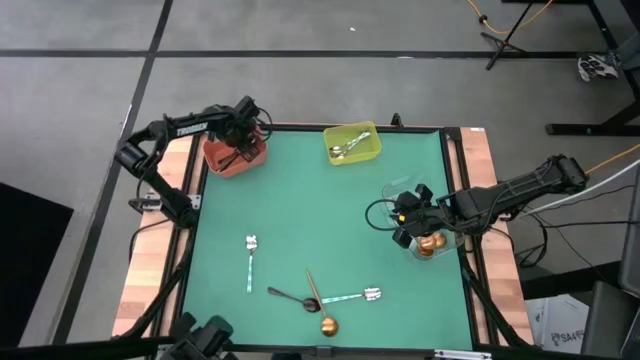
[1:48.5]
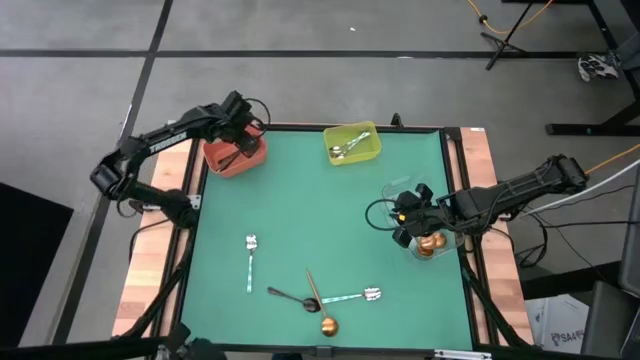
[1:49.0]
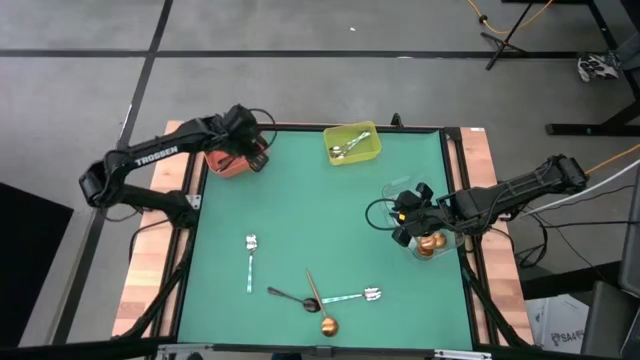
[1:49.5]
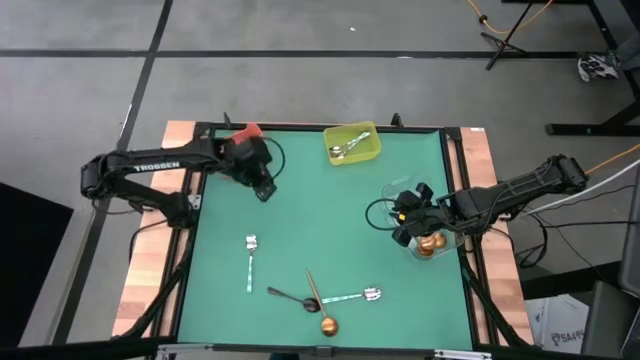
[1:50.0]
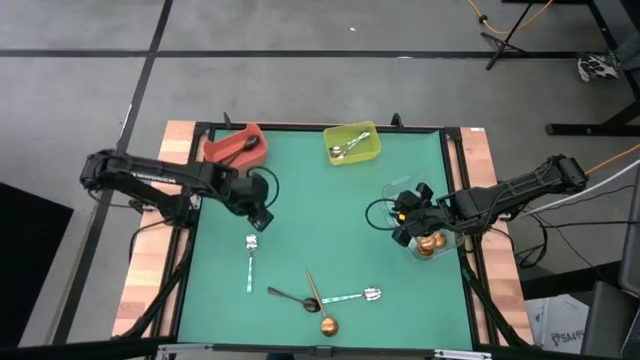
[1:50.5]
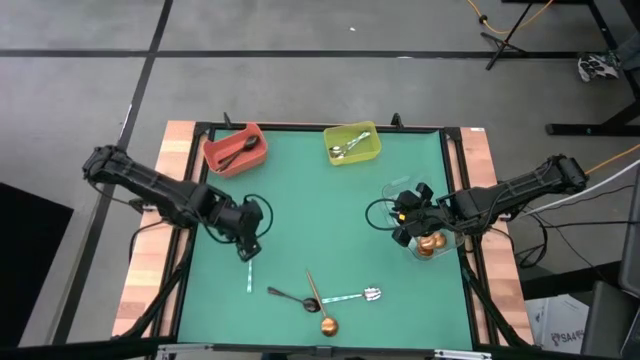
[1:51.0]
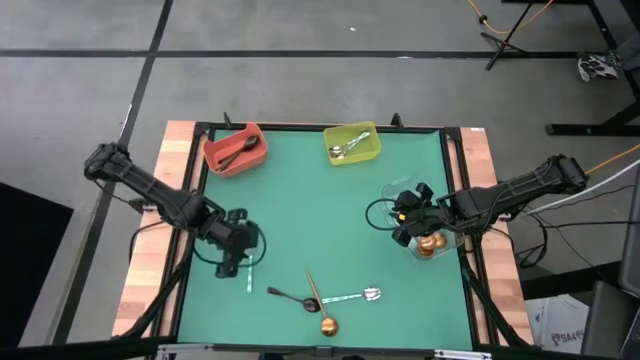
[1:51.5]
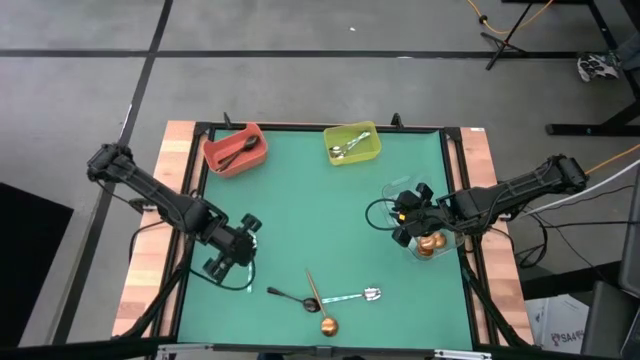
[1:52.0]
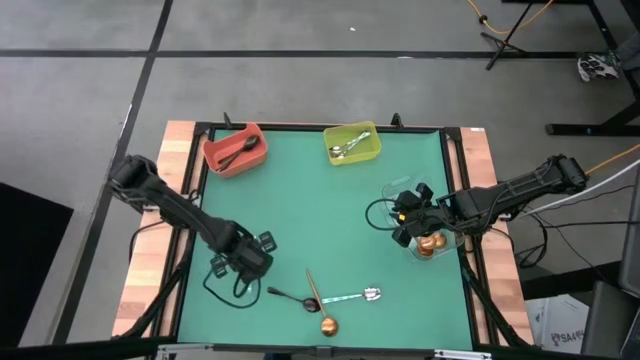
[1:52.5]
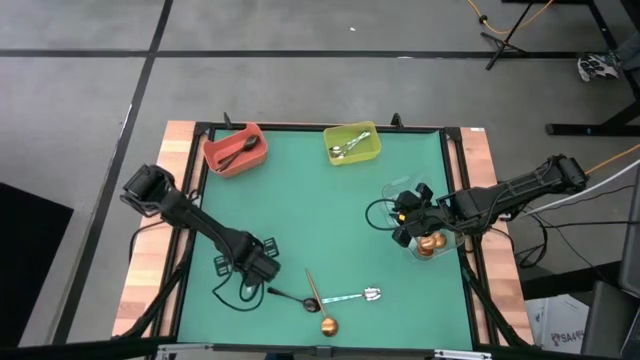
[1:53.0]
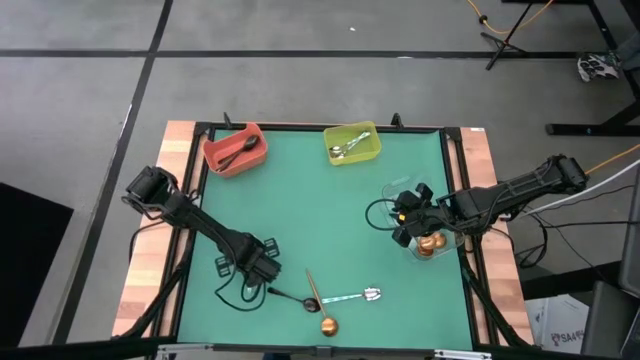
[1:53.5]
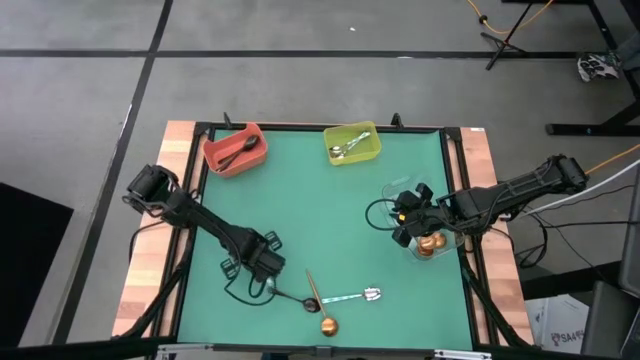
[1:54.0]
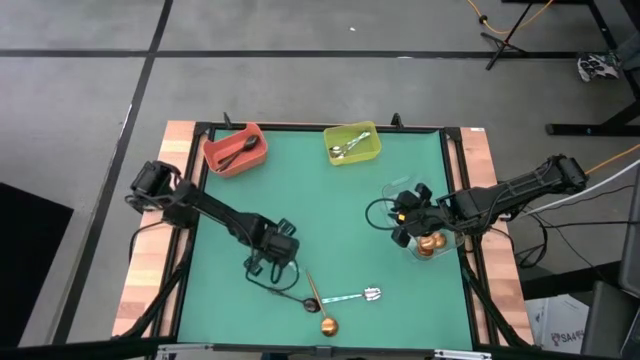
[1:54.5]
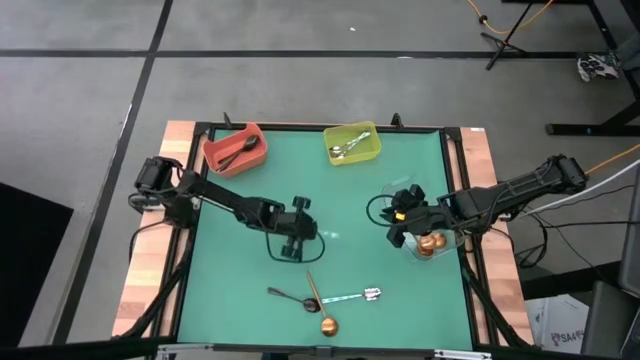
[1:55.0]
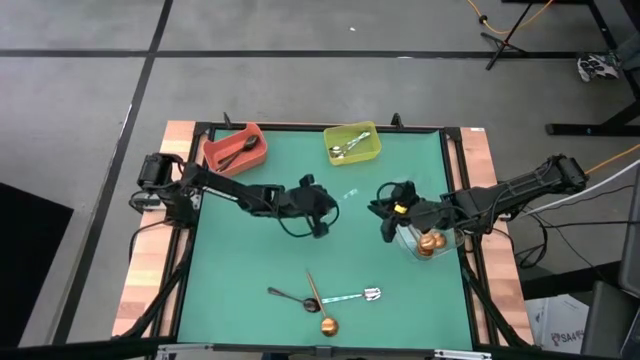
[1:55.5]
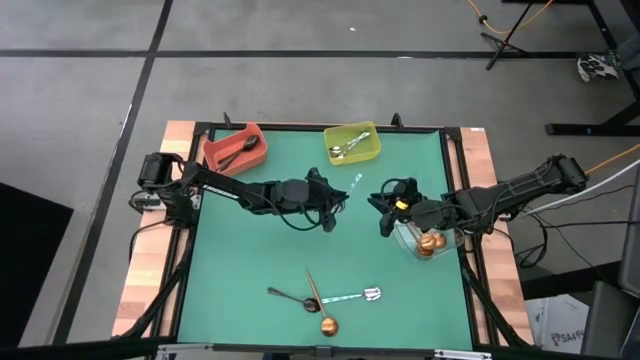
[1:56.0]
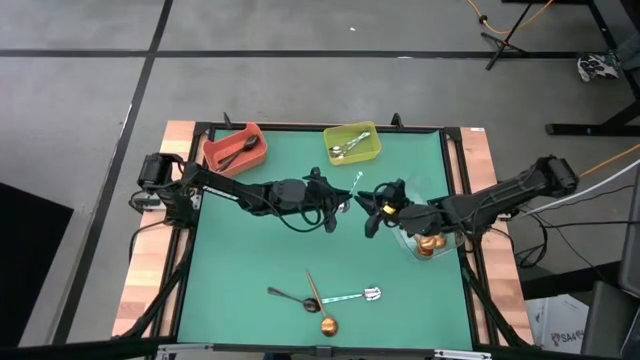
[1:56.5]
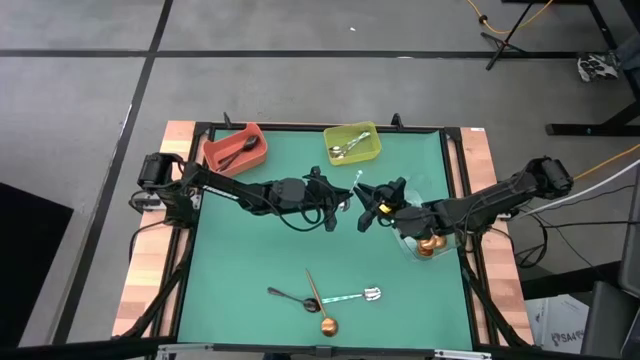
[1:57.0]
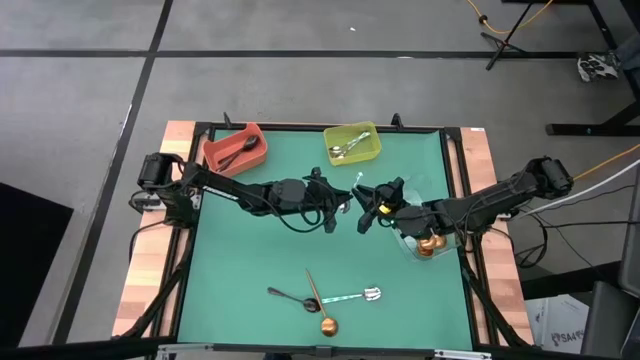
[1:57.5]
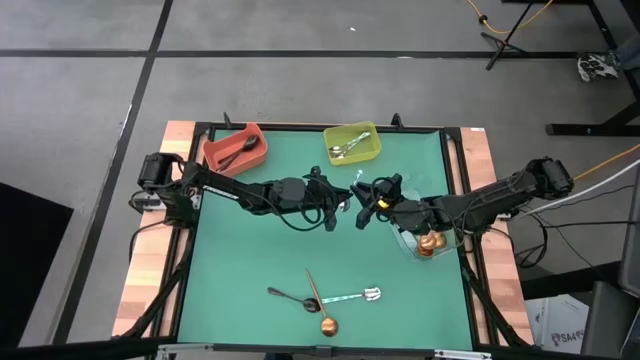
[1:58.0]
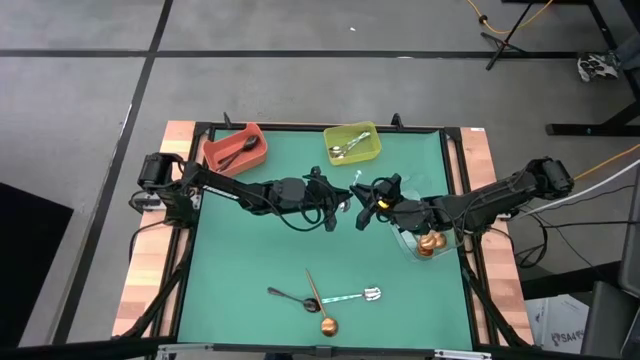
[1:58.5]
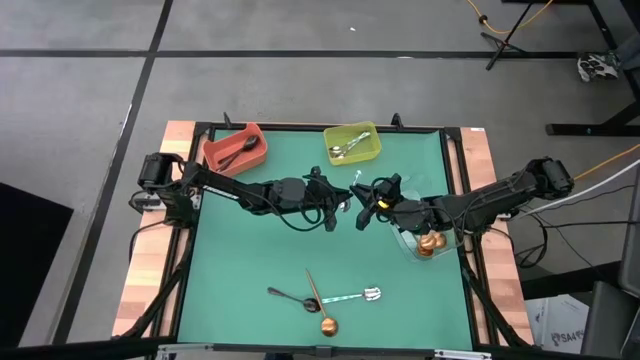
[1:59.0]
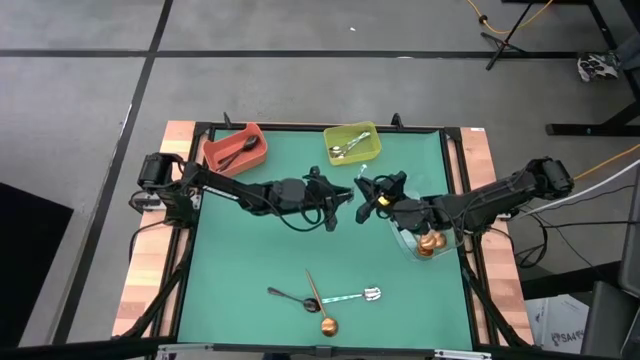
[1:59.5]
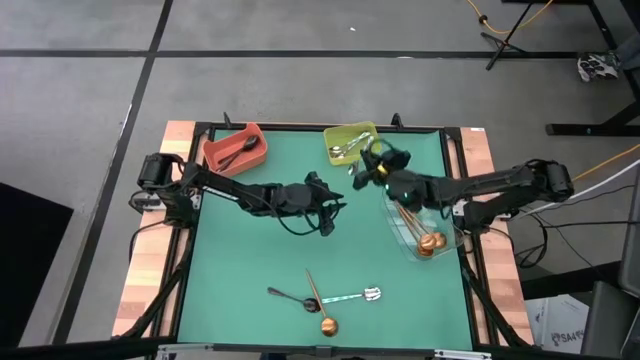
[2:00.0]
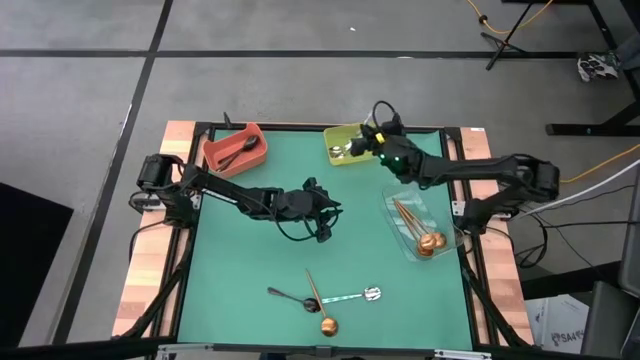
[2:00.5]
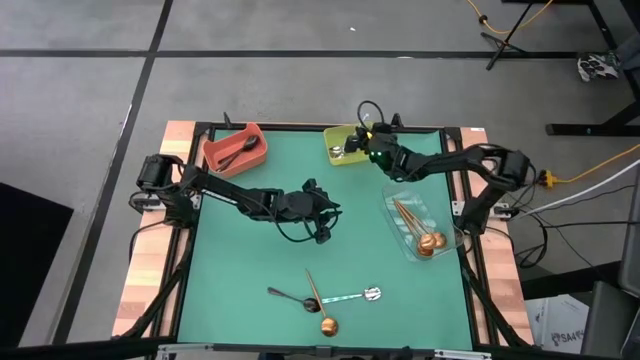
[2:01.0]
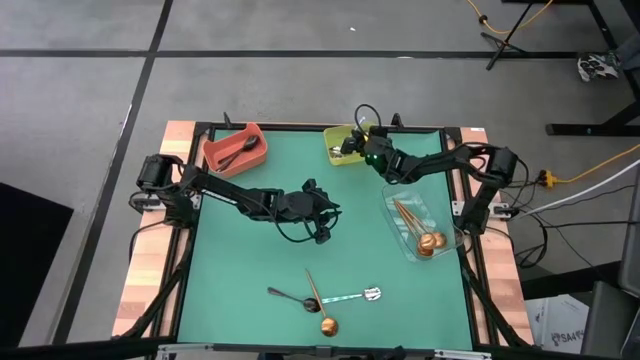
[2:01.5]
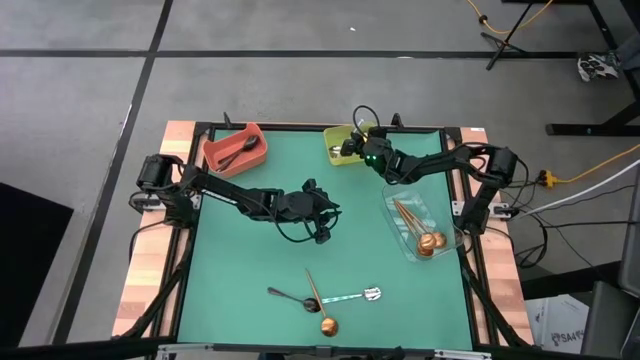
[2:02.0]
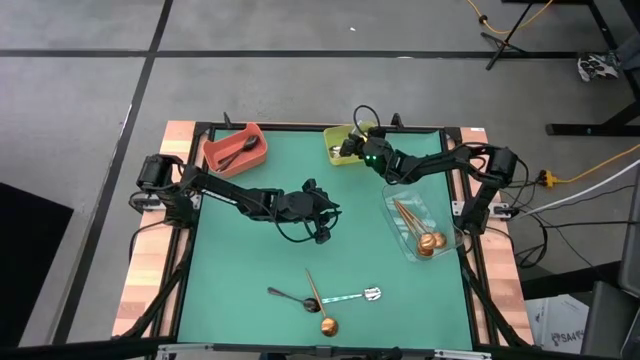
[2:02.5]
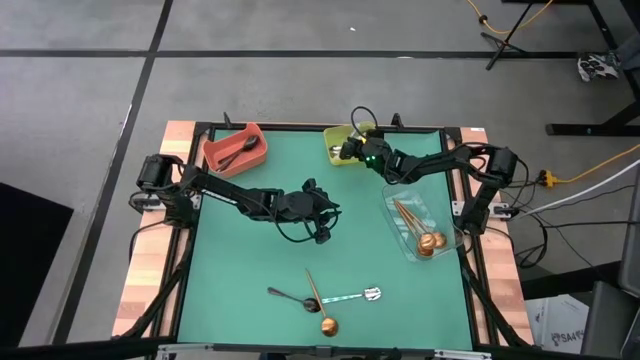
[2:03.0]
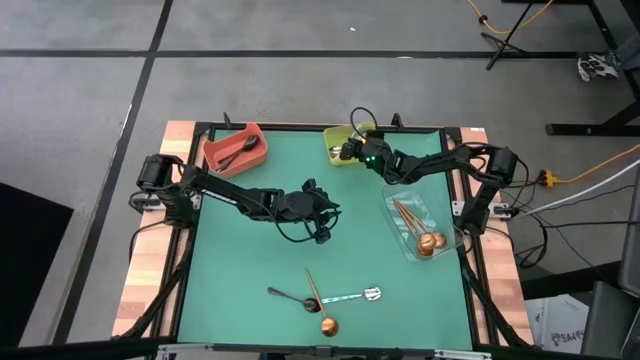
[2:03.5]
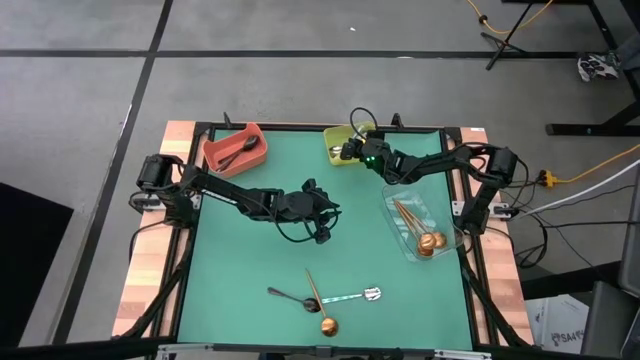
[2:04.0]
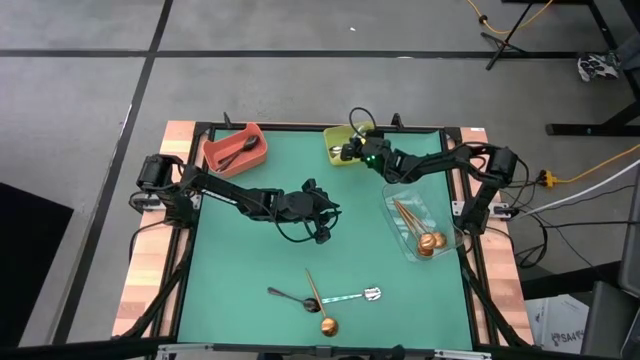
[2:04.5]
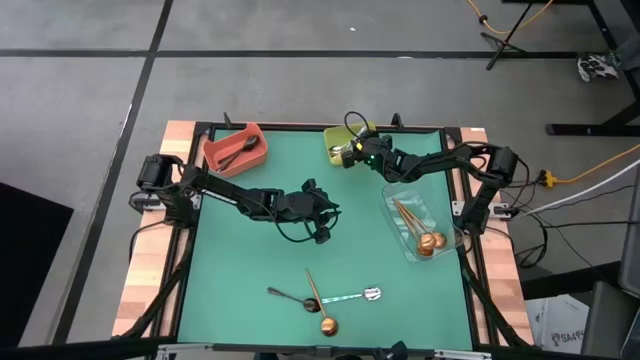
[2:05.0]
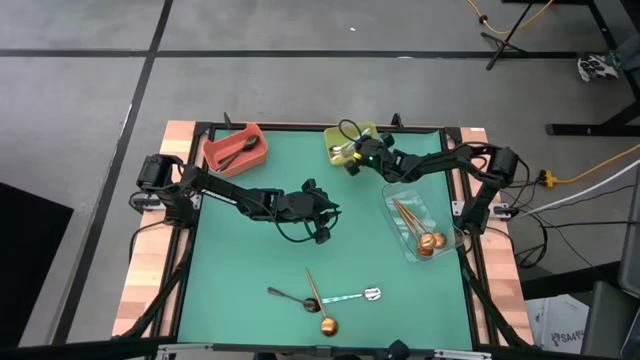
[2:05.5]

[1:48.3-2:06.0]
Task: Sort silverware by color (type)
Put the left white and green spoon into the yellow bin

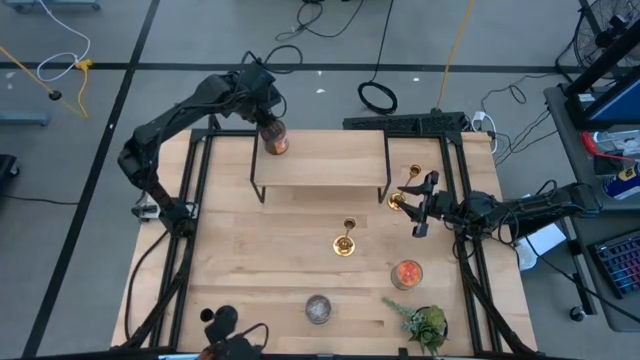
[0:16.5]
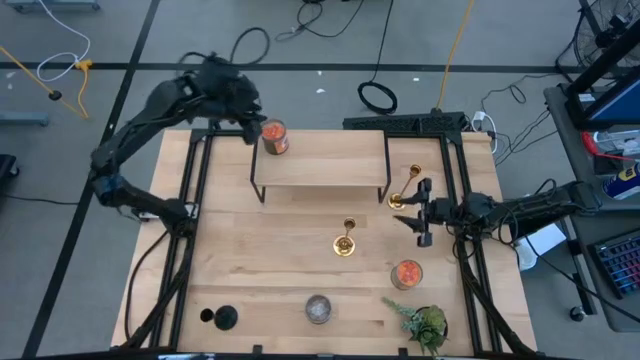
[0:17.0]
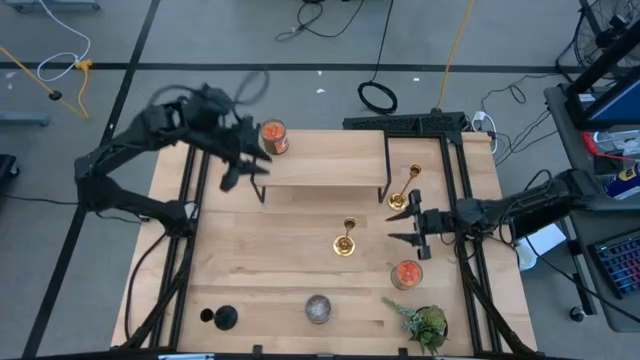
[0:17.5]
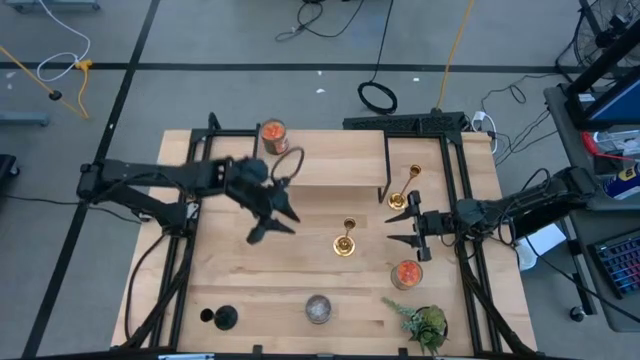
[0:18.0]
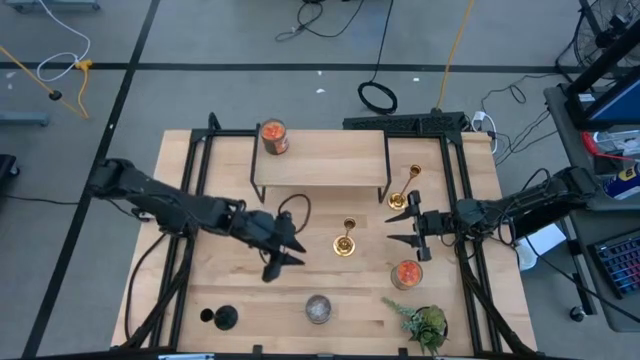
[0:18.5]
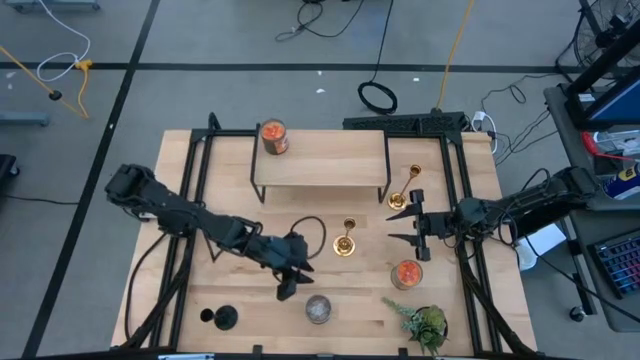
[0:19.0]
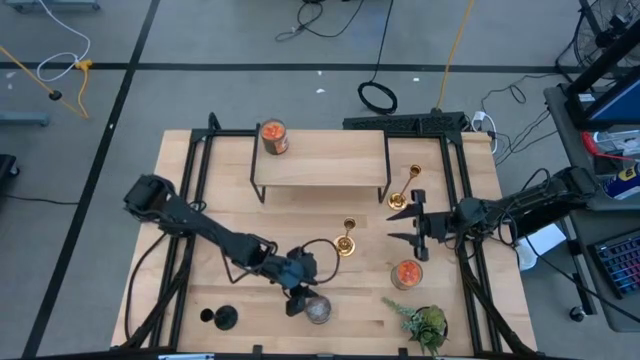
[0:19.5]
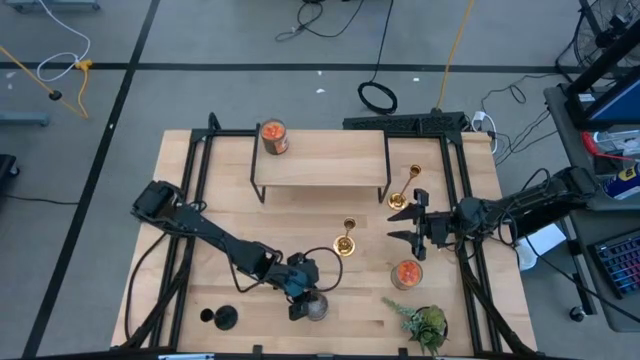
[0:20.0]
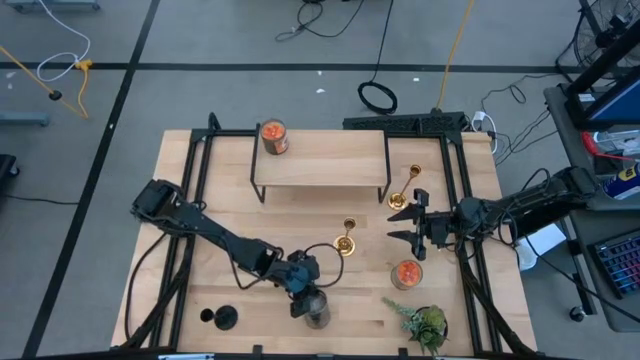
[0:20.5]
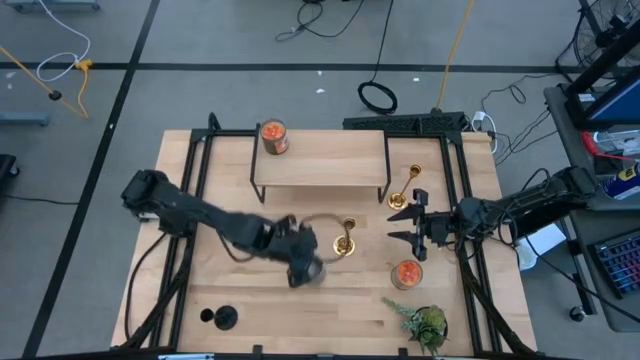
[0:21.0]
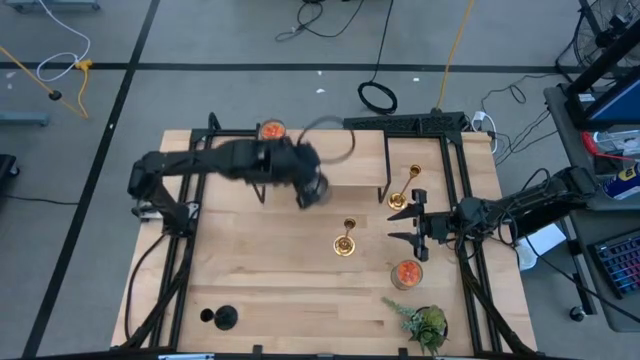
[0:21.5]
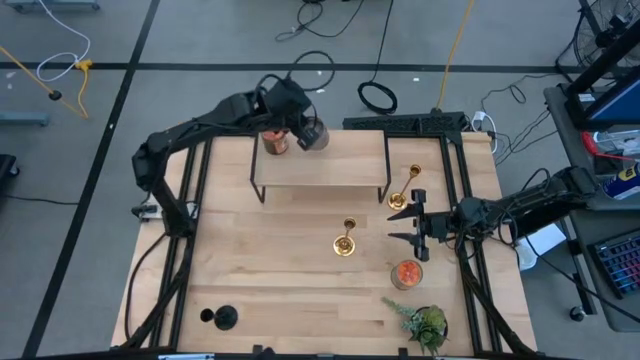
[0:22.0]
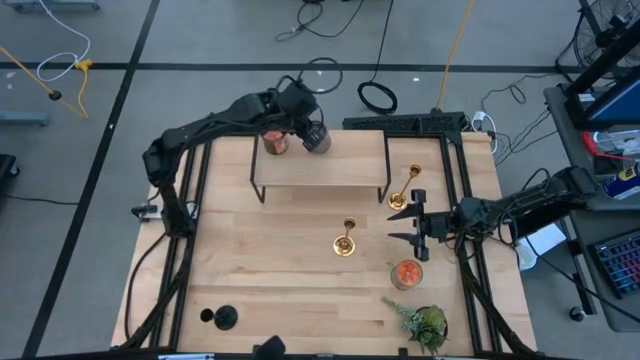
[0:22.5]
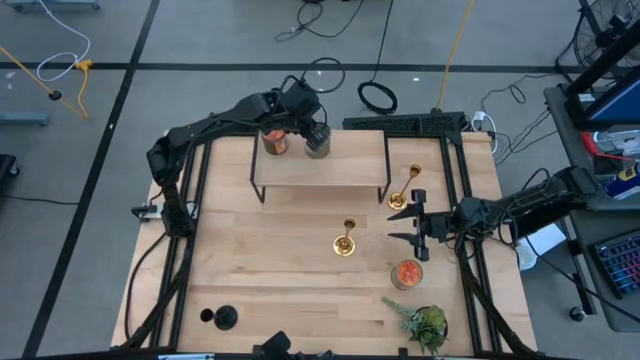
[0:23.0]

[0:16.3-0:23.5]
Task: Pick & Place candle stick holders
Put the brown candle on the shelf
